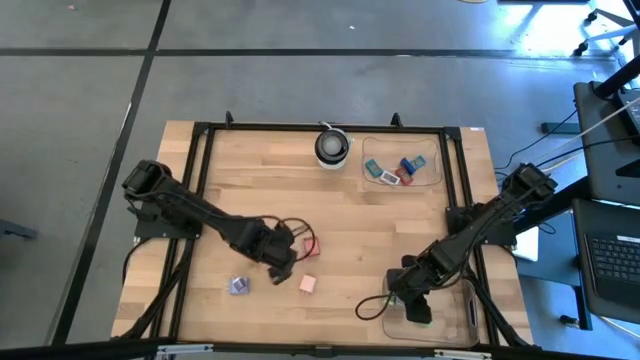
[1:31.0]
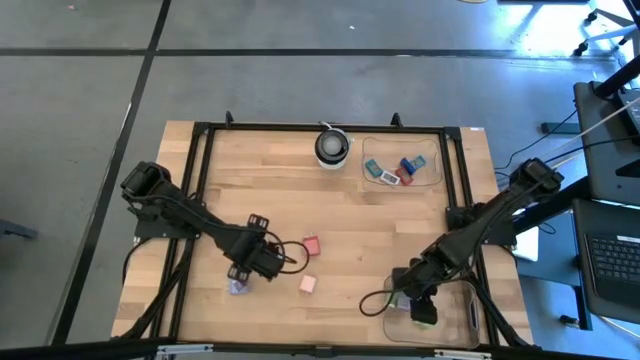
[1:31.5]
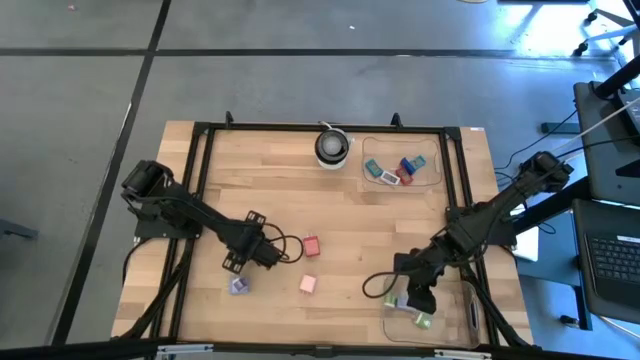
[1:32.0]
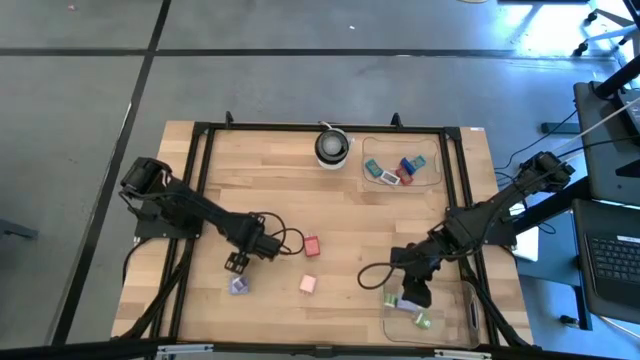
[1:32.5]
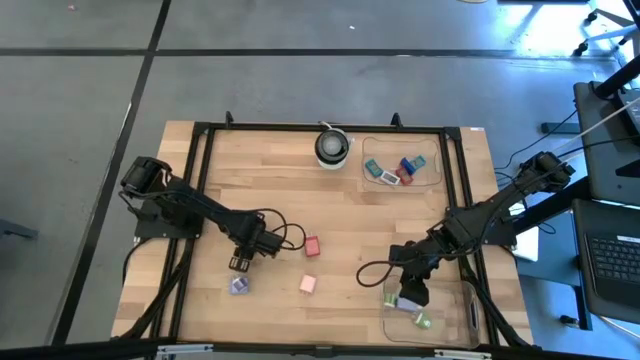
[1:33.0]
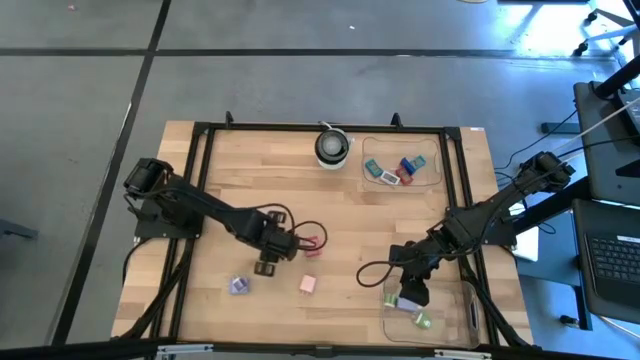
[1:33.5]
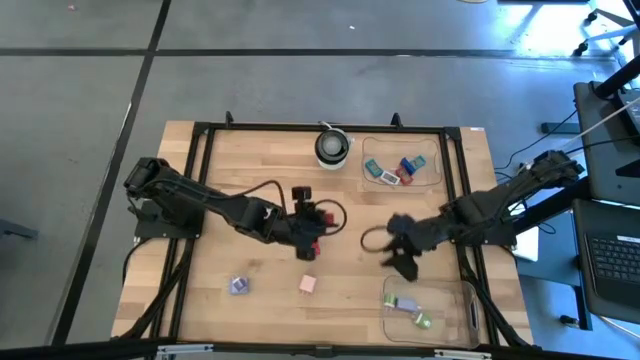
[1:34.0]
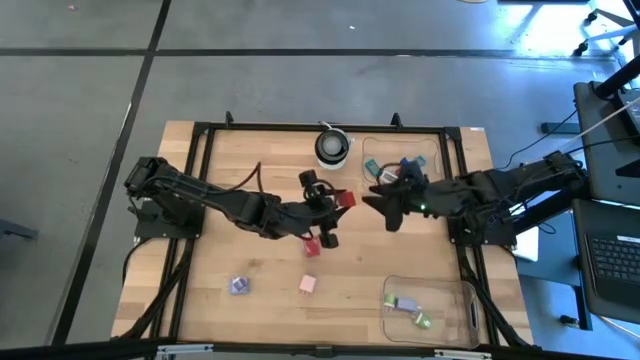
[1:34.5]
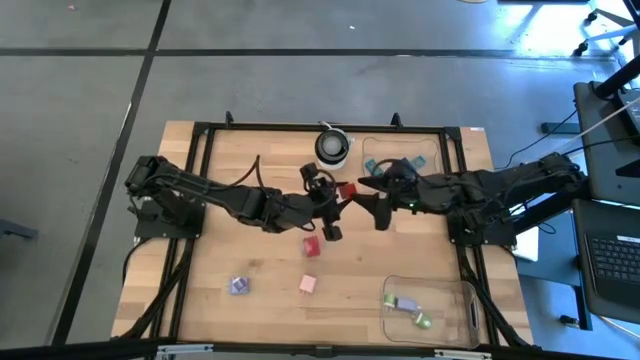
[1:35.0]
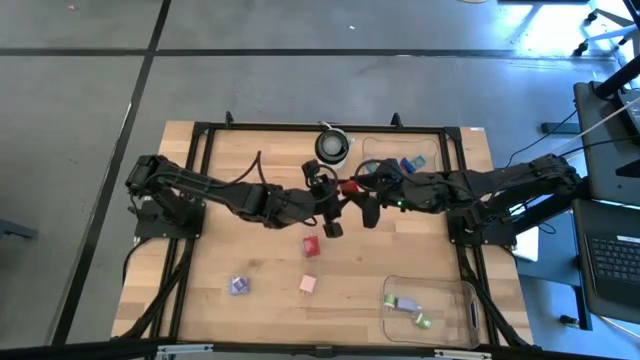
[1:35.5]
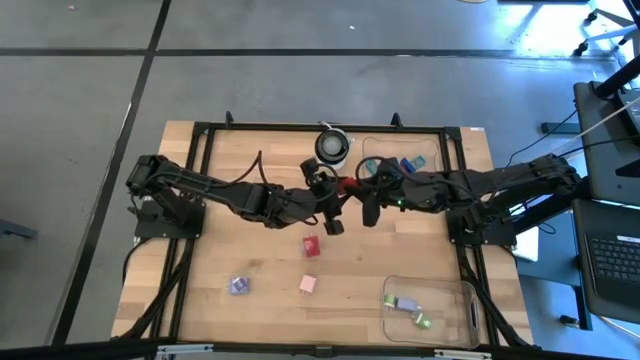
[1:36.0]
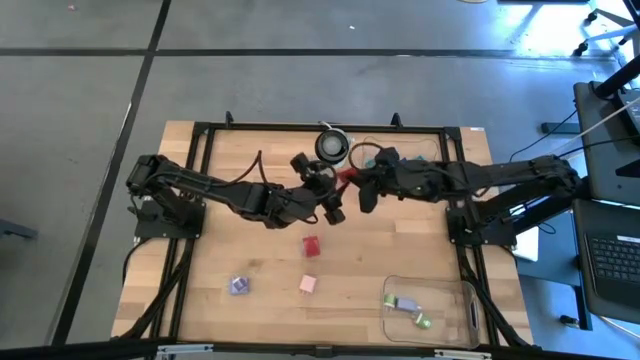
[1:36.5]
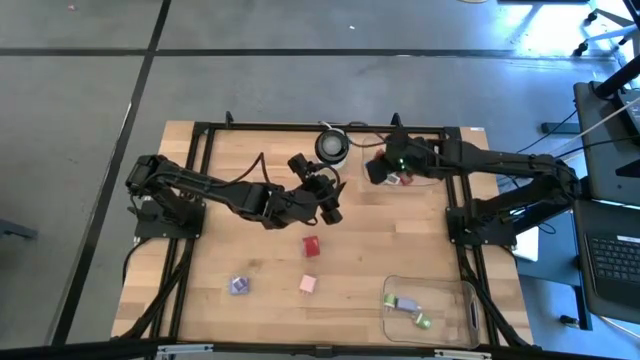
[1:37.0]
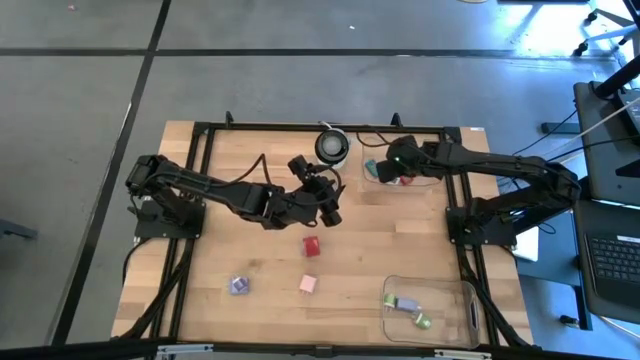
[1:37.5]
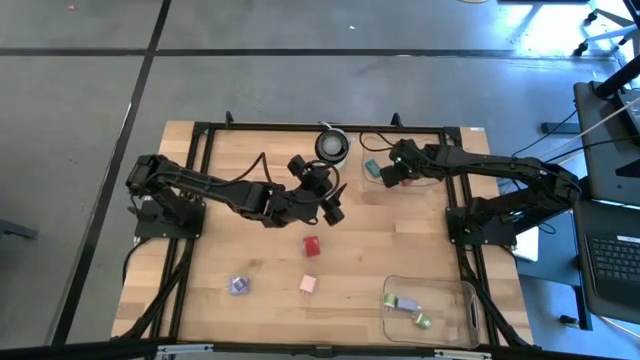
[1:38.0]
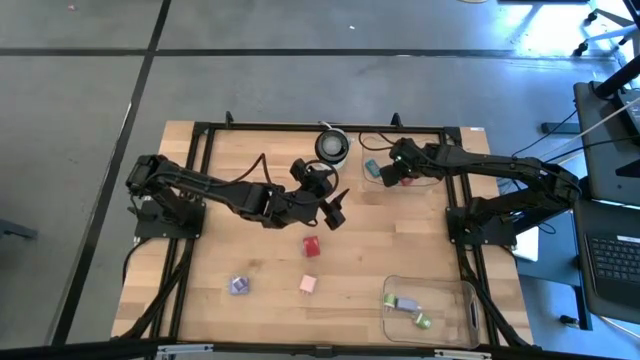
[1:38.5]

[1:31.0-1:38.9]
Task: Pick & Place Office items
Put the red digital timer into the top transparent bin

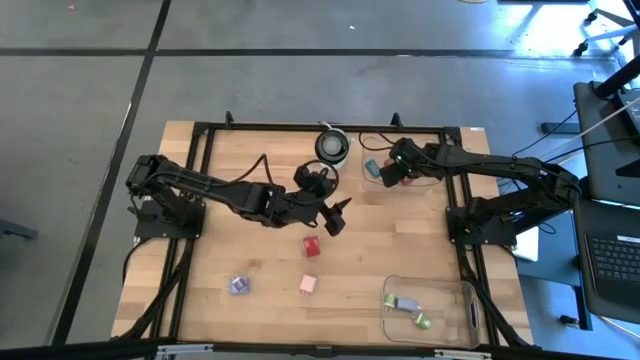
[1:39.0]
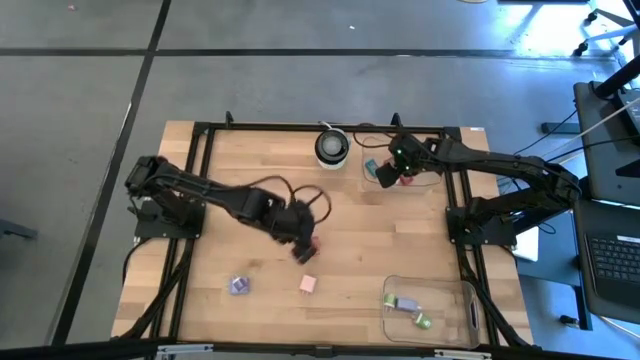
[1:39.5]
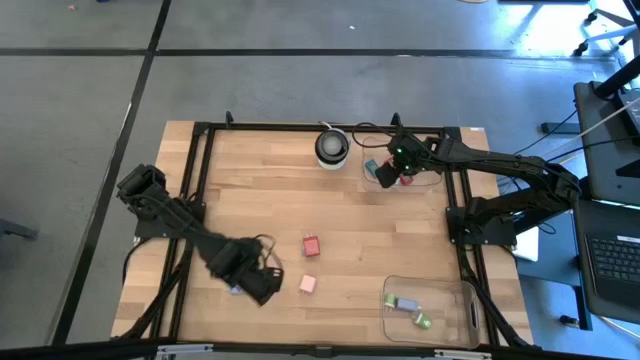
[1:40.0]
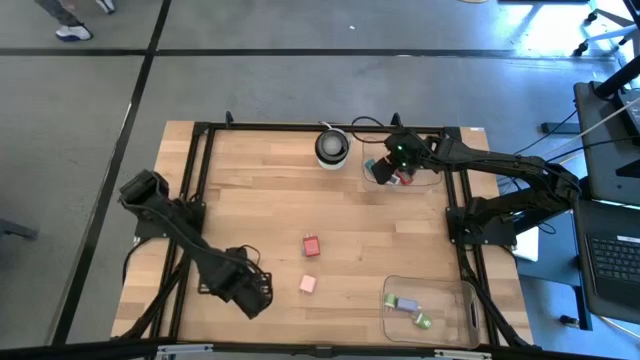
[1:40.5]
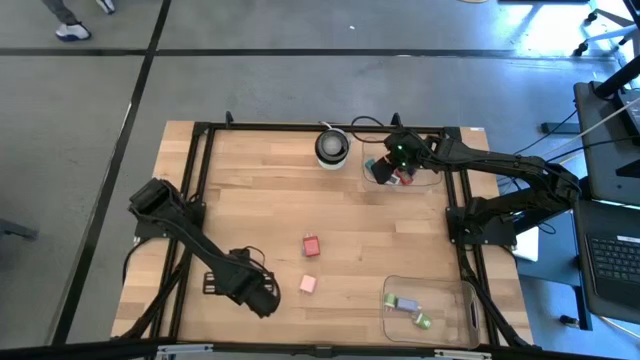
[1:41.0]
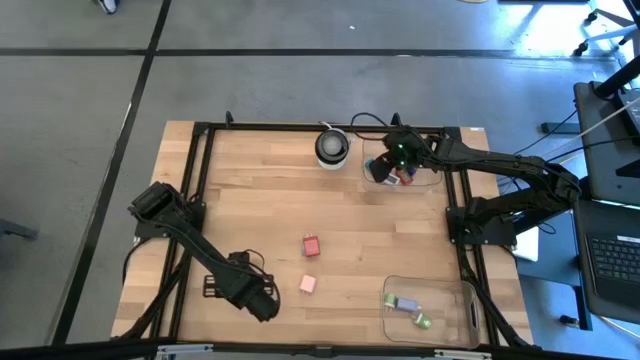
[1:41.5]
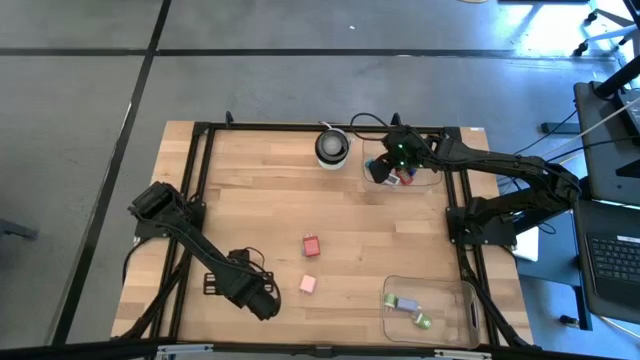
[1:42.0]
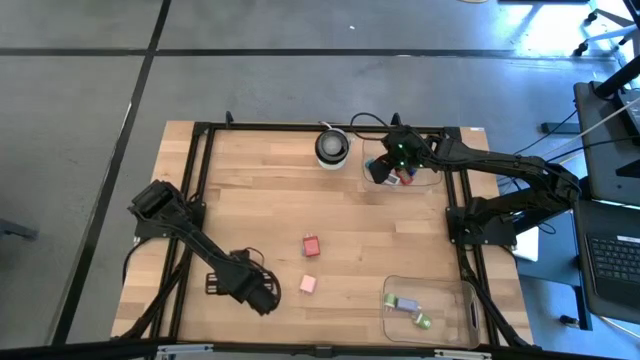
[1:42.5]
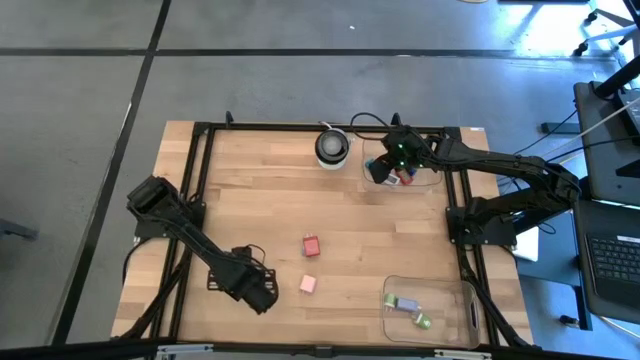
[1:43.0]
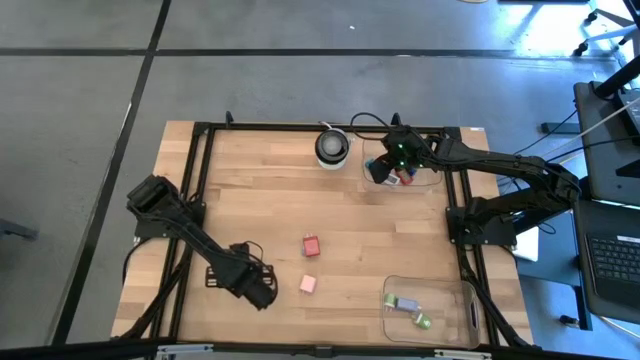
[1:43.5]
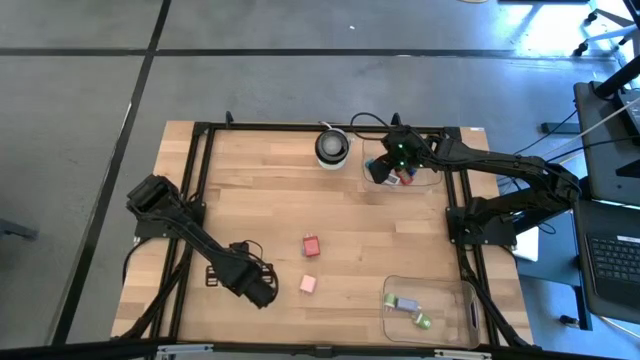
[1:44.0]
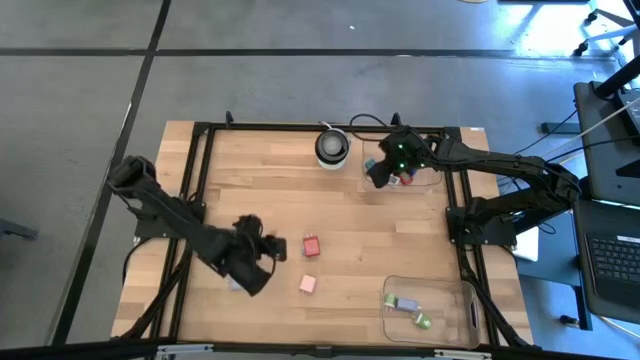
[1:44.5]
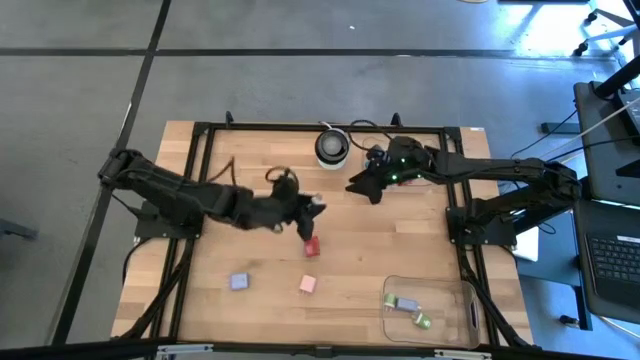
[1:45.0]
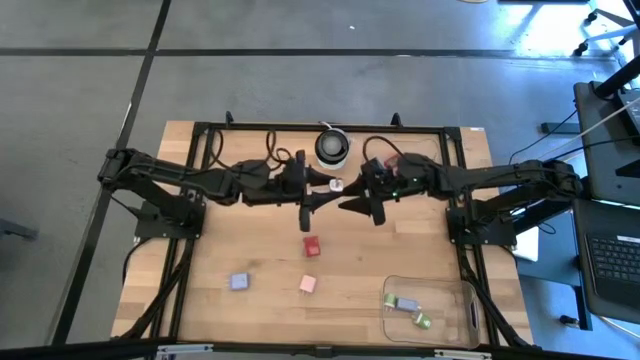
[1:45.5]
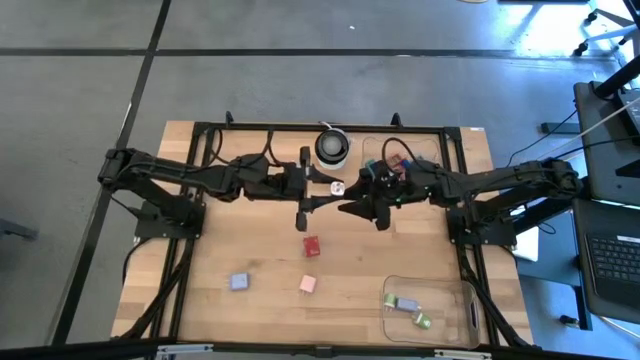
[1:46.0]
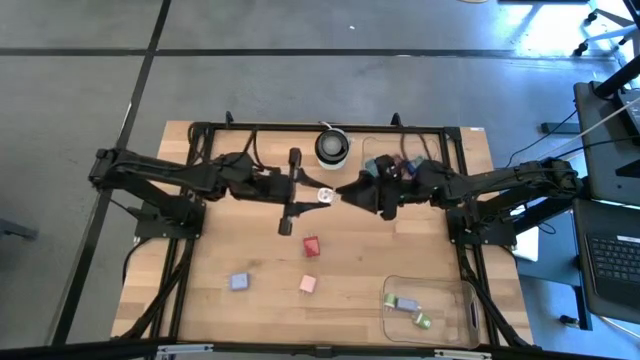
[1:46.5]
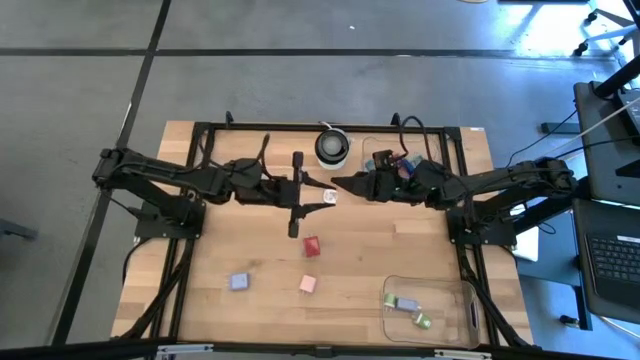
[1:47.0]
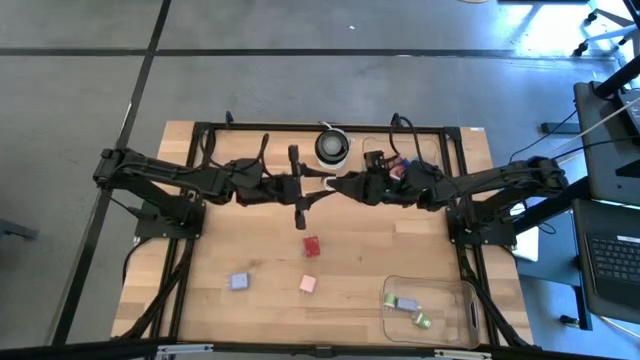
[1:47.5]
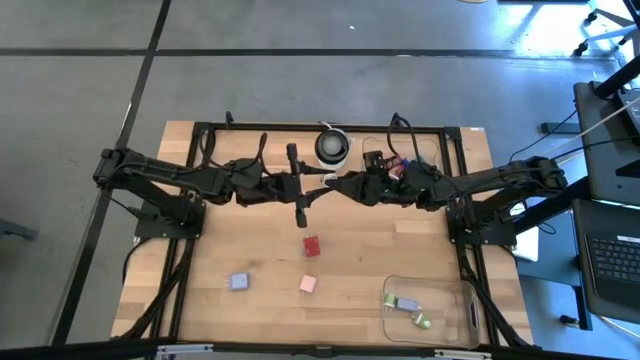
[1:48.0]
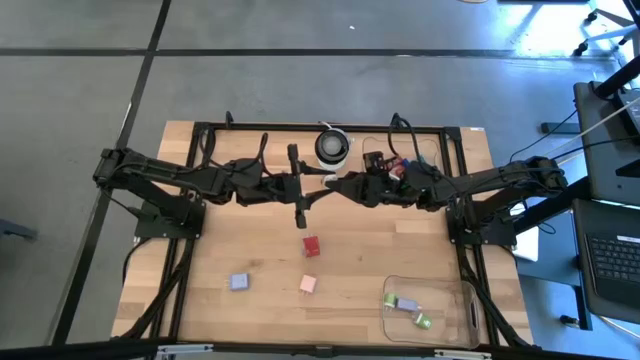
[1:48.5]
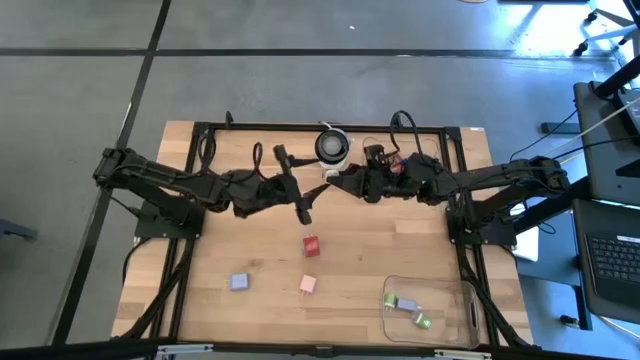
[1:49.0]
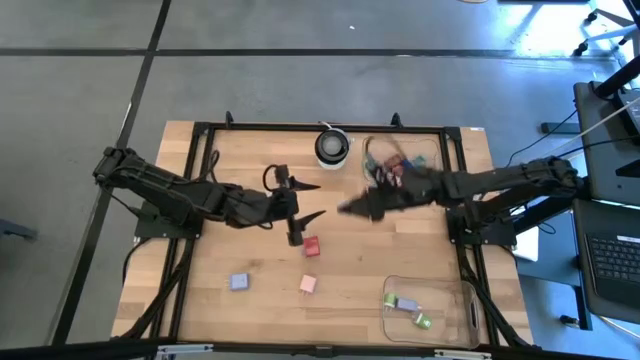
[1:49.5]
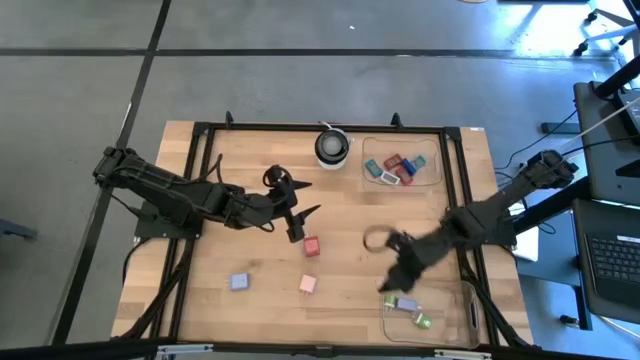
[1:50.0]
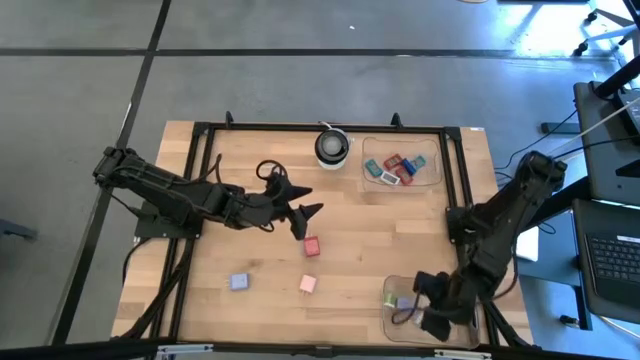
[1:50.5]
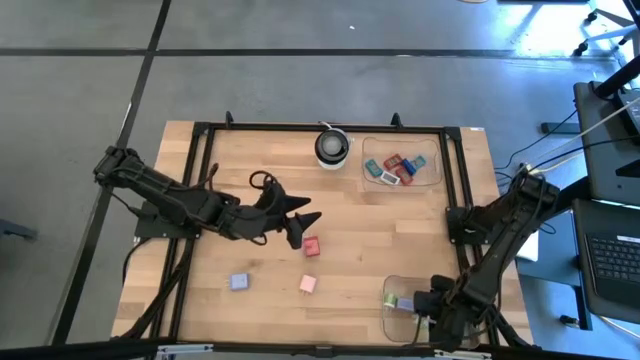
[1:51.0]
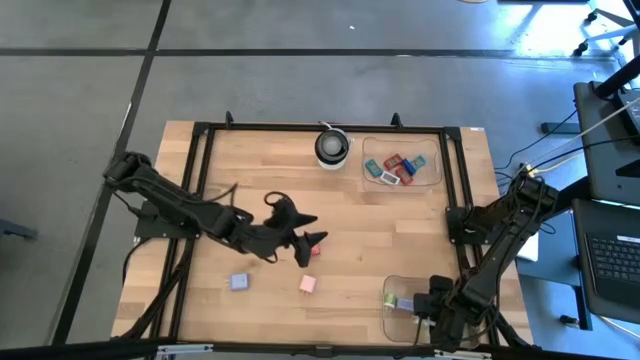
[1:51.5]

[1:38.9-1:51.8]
Put the violet charger adapter into the bottom transparent bin

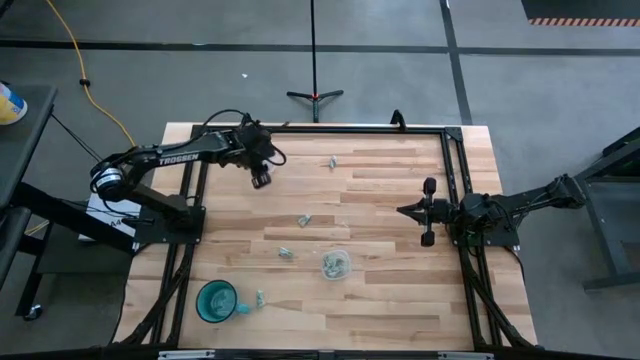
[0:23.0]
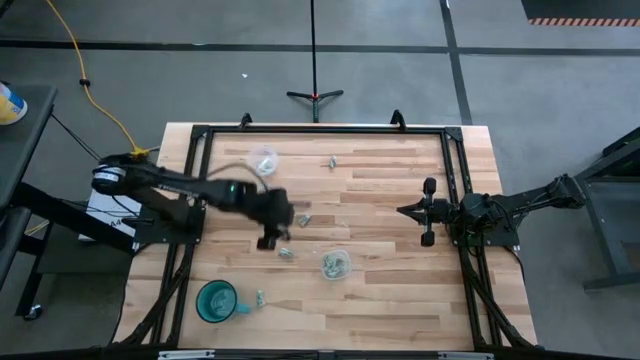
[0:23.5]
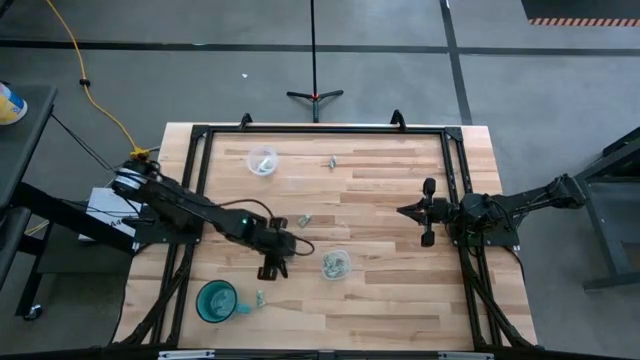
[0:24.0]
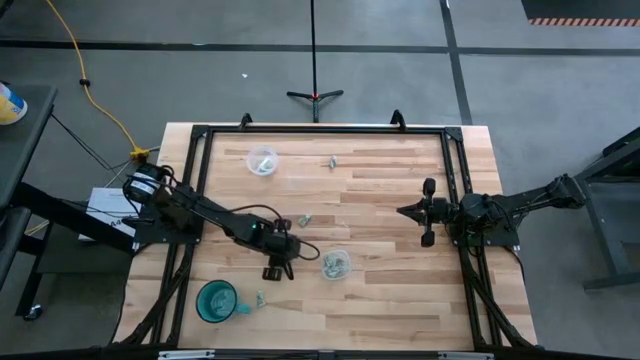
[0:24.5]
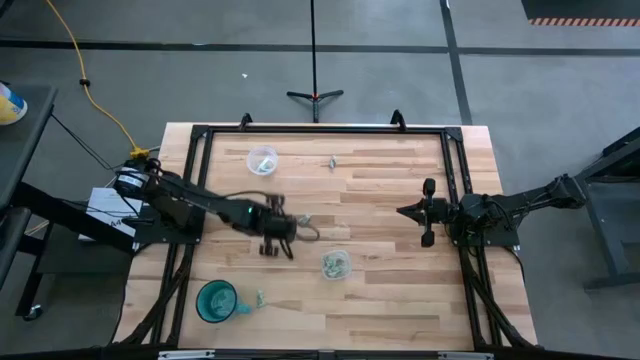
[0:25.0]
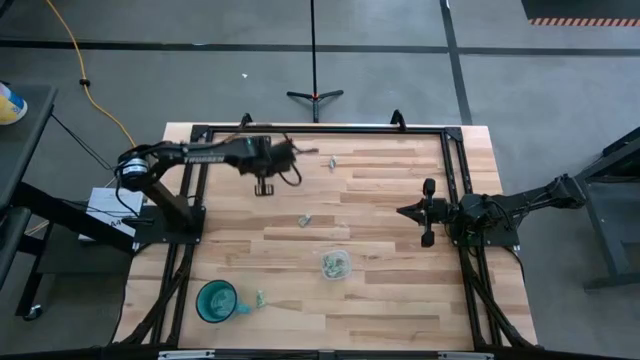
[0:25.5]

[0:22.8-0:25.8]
Task: Pick and place Stevia / Truvia into bins
Put the stevia packet into the top transparent container
